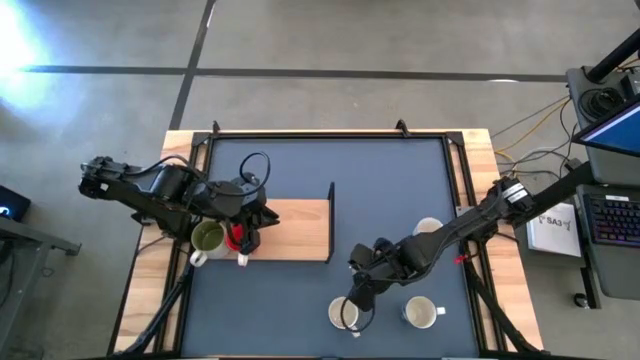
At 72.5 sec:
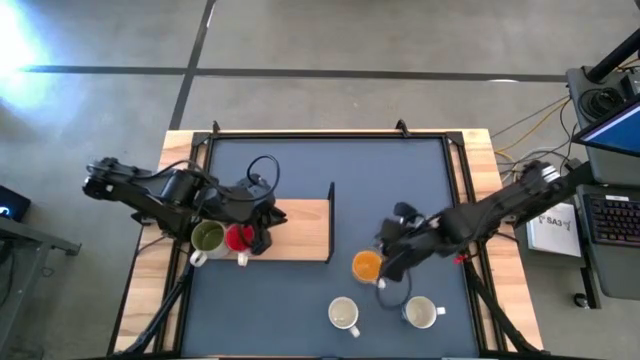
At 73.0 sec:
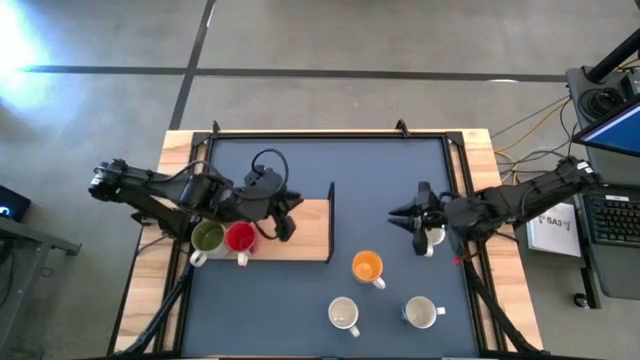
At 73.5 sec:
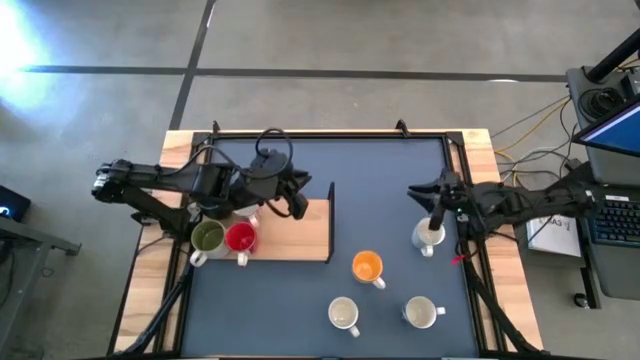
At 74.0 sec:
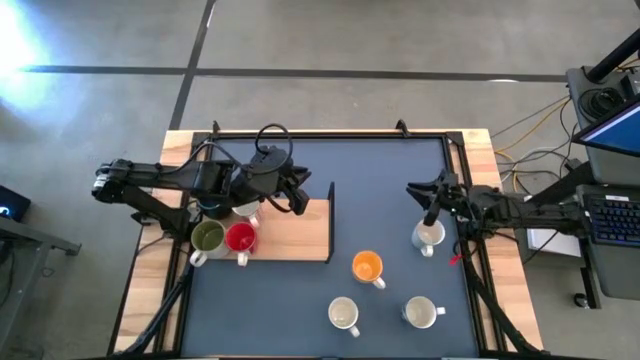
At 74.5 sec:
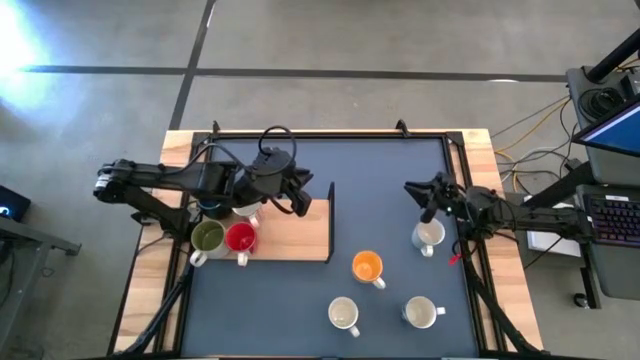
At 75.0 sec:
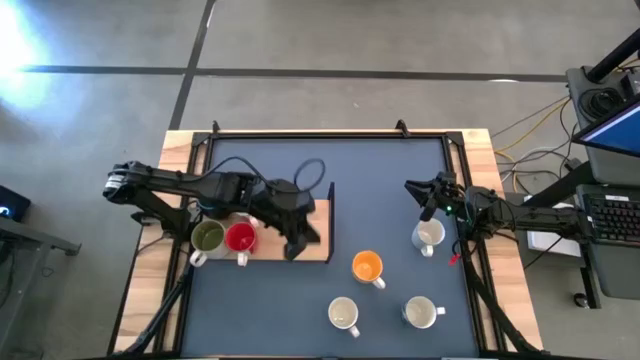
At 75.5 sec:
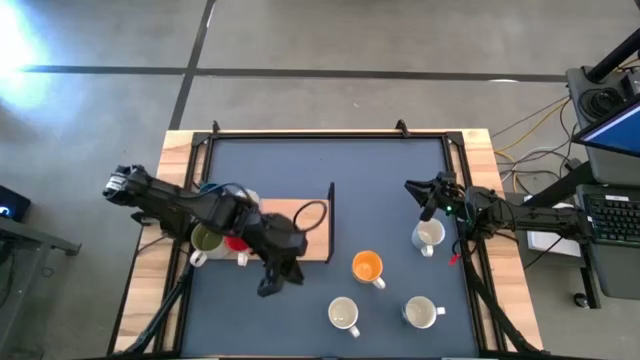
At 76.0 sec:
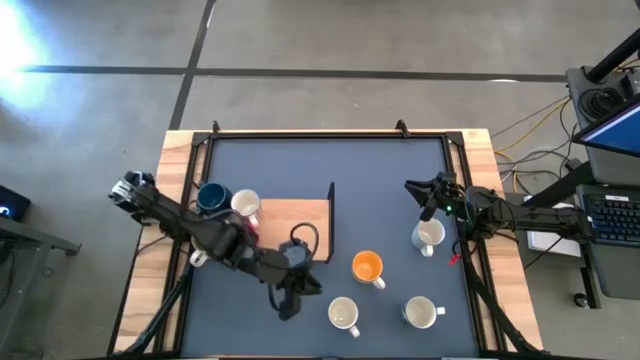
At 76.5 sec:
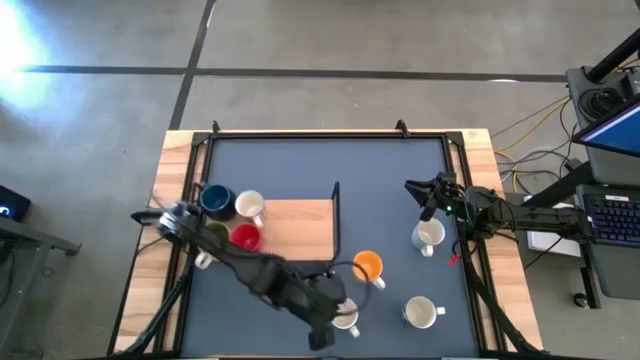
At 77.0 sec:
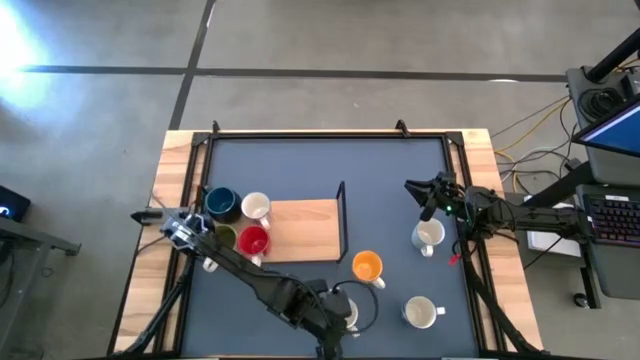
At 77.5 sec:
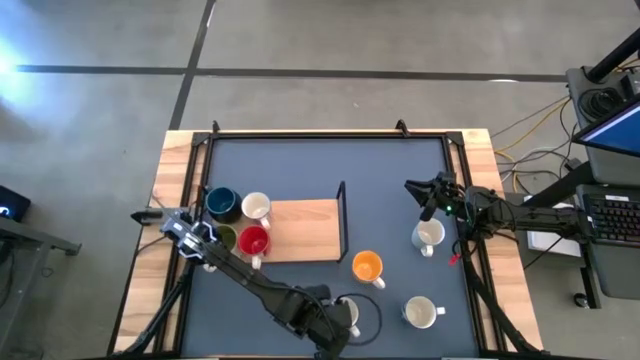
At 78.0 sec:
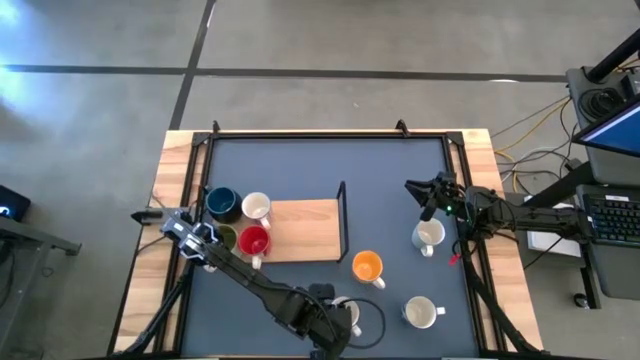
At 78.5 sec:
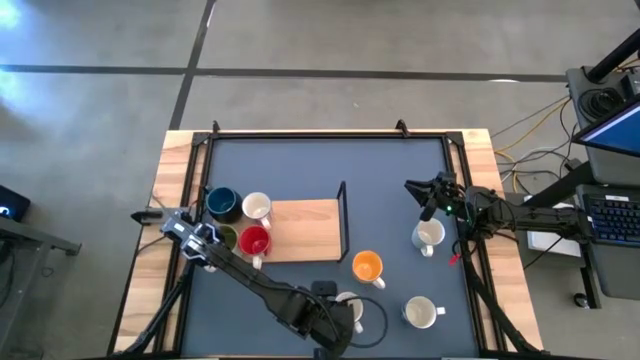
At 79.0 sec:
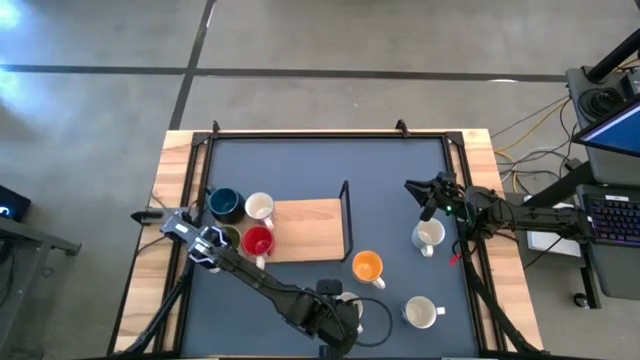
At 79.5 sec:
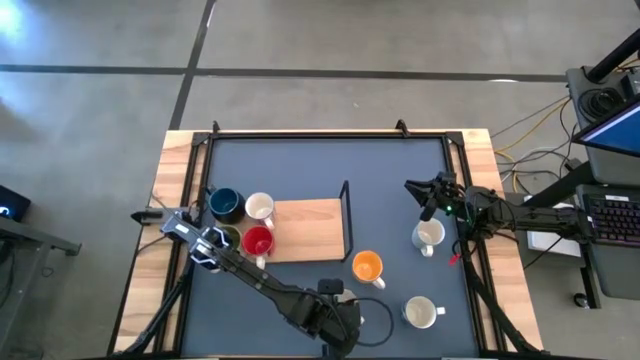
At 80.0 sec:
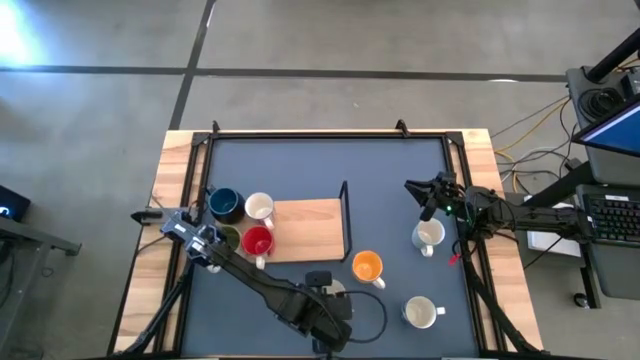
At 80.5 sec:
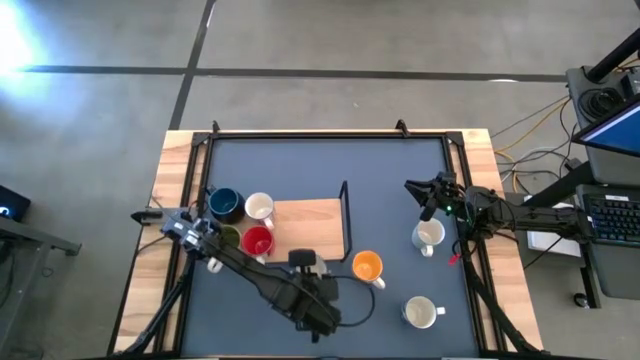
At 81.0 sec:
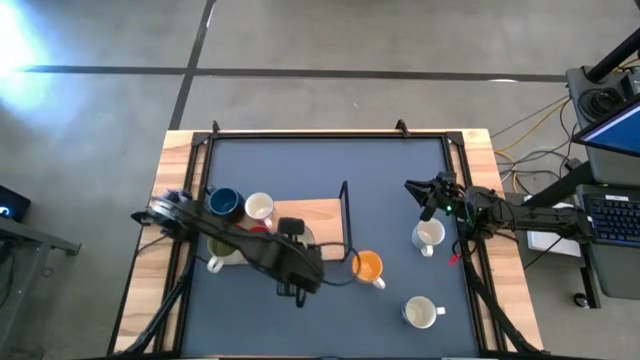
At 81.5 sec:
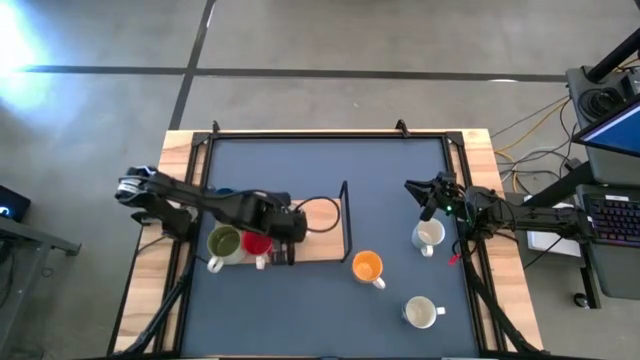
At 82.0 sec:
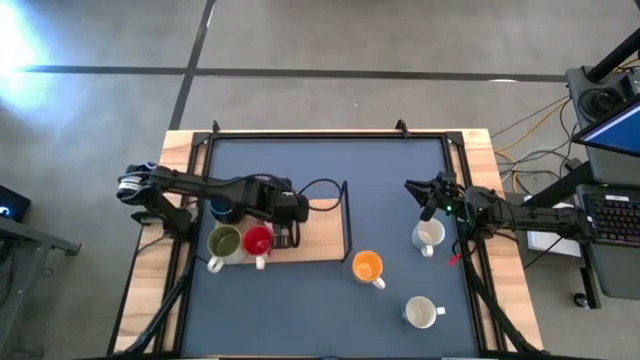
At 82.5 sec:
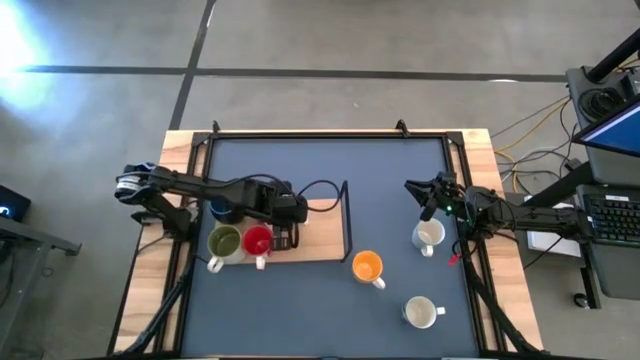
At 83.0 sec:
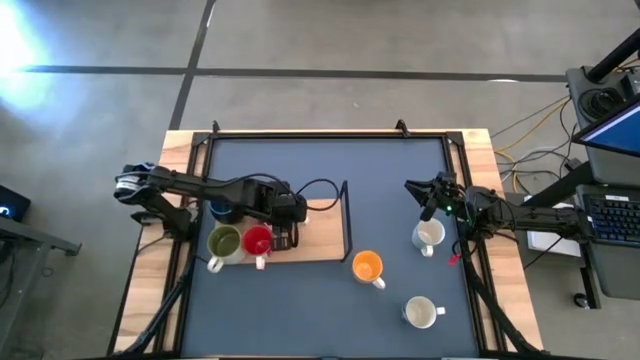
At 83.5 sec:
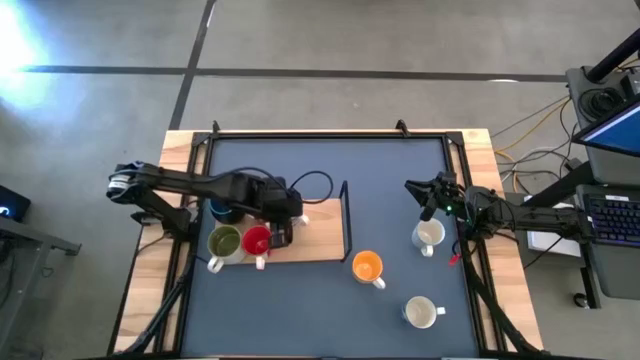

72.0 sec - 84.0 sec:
Task: Place coffee mugs
Put the left white blue patterned mug on the shelf

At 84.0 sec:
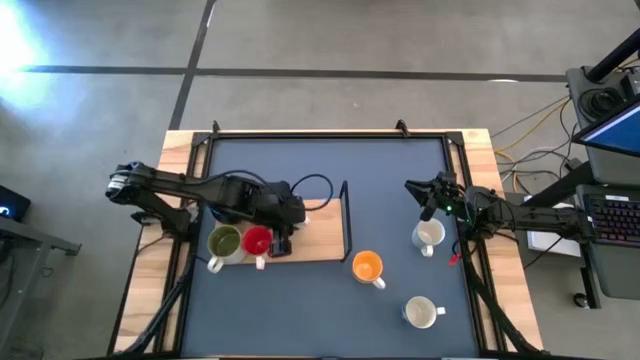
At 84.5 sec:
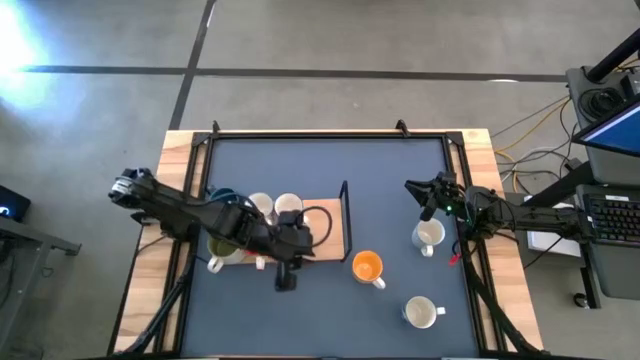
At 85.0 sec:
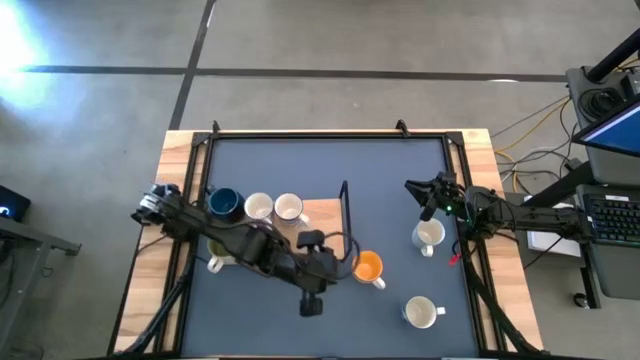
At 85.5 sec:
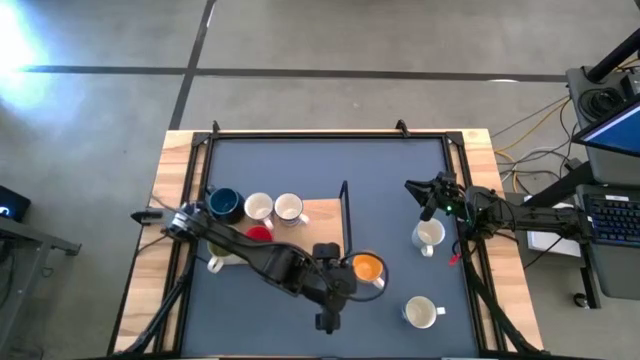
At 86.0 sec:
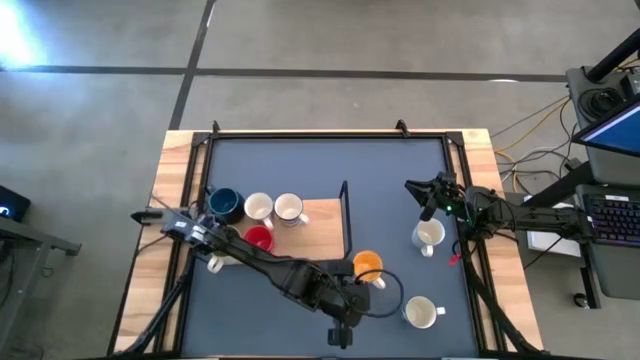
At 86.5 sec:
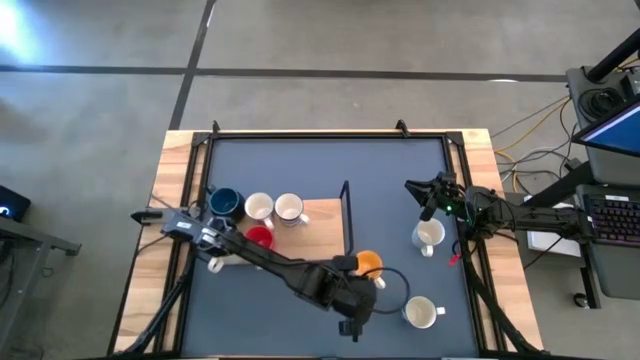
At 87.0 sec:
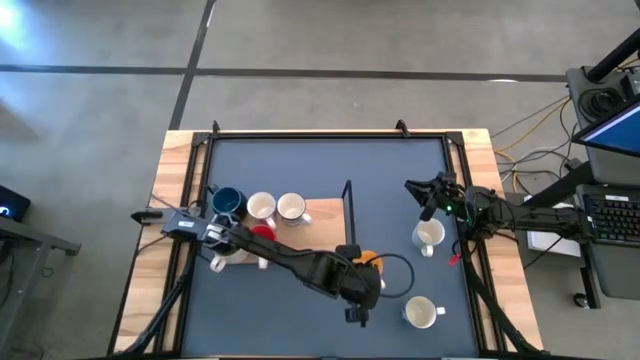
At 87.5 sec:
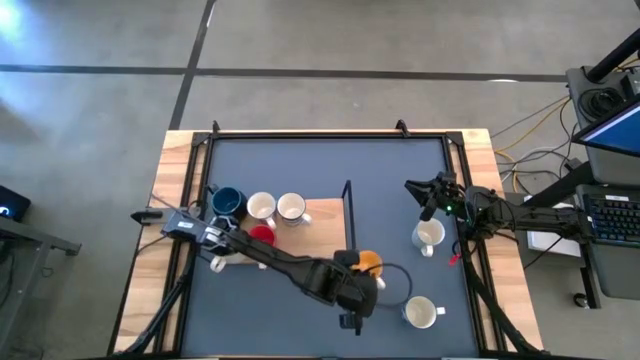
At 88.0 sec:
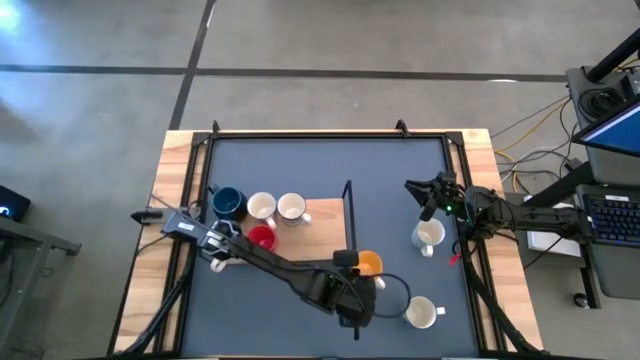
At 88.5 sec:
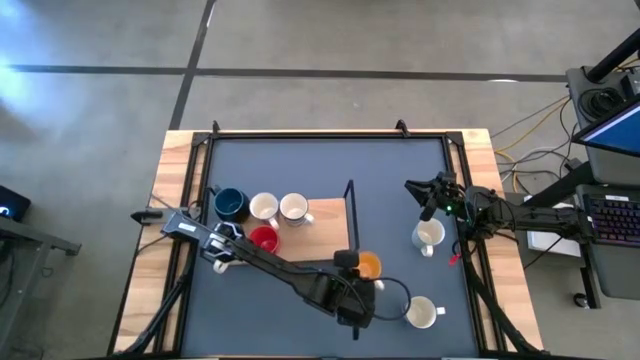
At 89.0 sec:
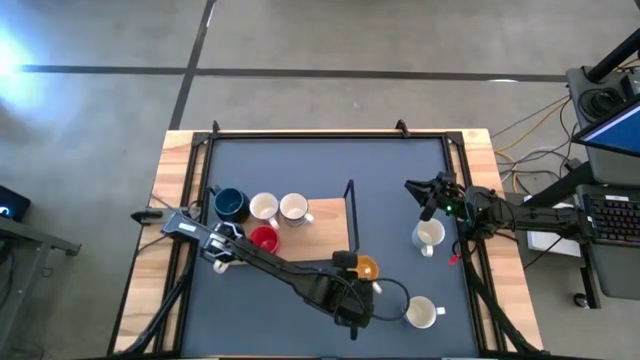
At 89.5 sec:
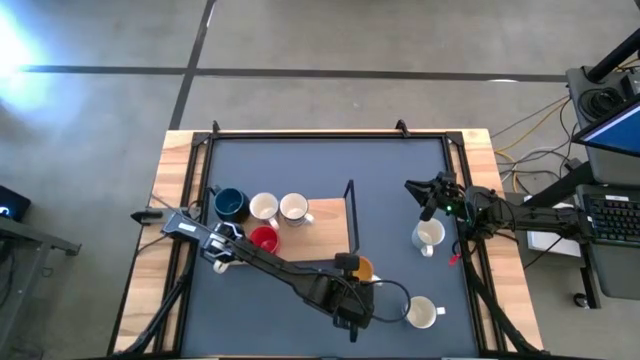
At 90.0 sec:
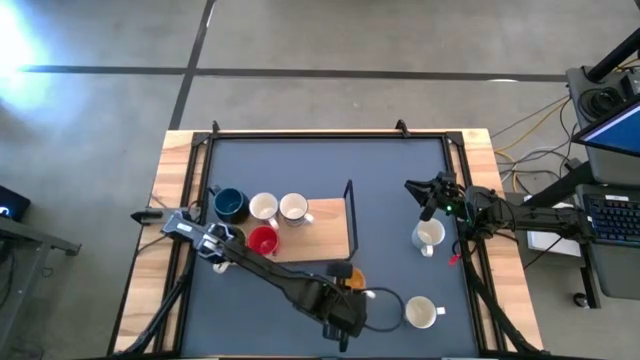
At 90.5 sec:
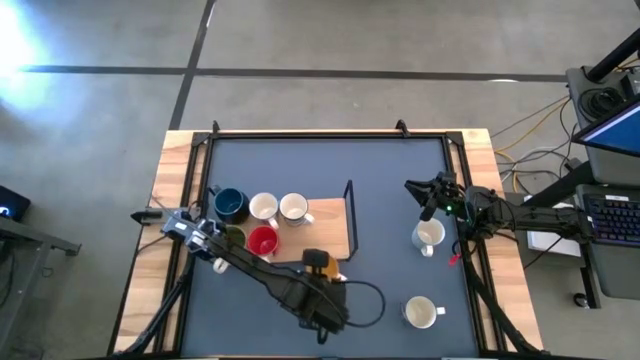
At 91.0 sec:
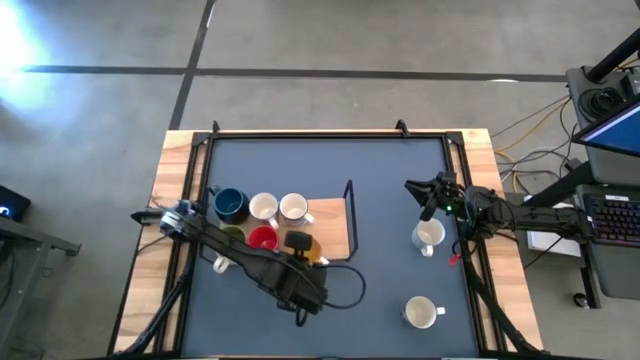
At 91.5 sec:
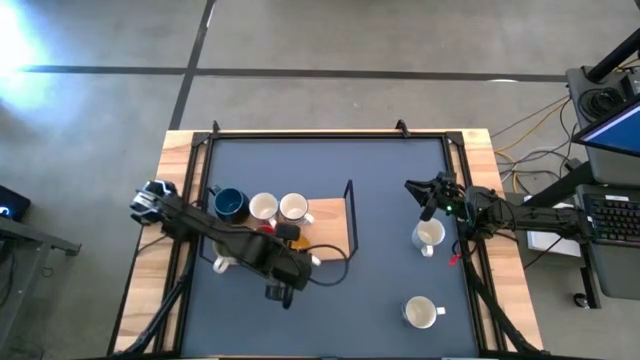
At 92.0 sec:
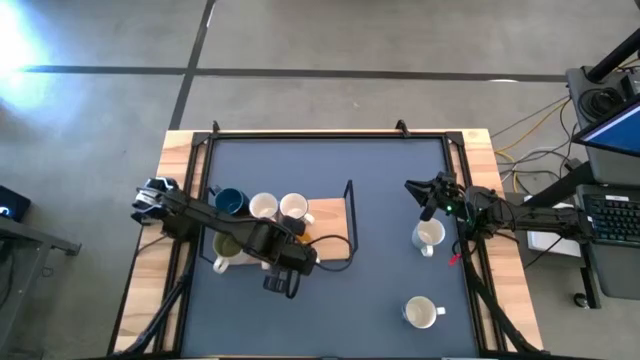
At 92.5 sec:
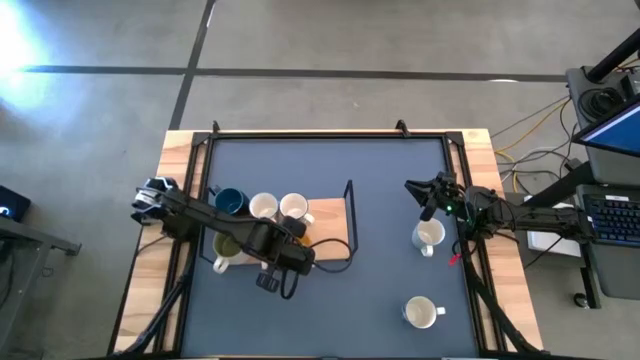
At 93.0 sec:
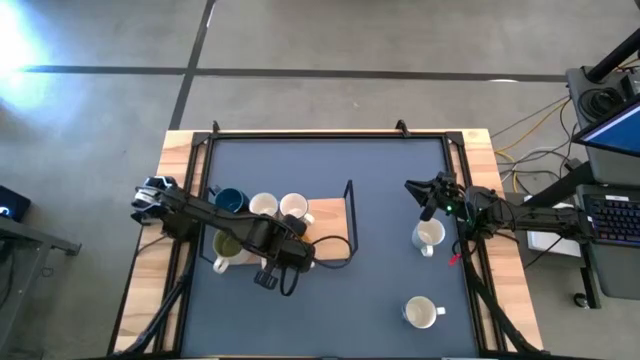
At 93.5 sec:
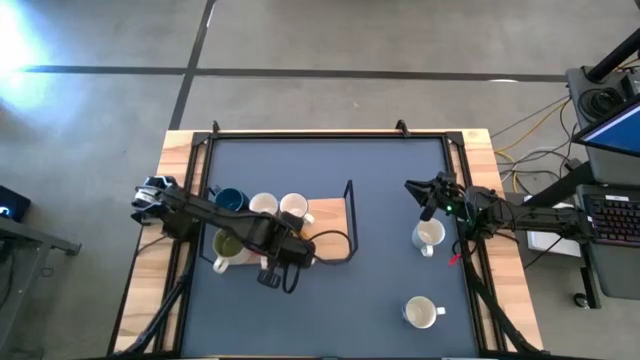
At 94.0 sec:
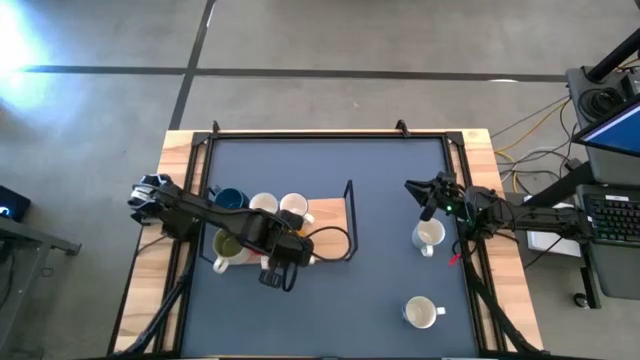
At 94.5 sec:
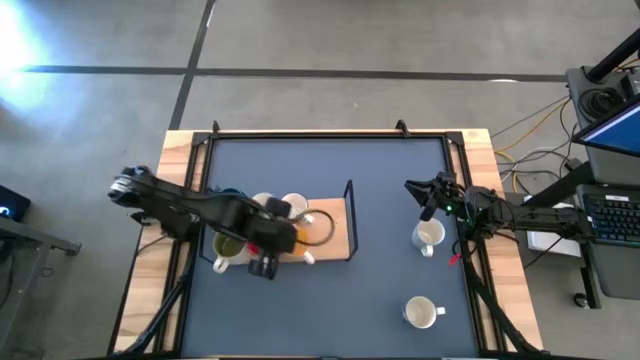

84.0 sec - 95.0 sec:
Put the yellow mug on the shelf
